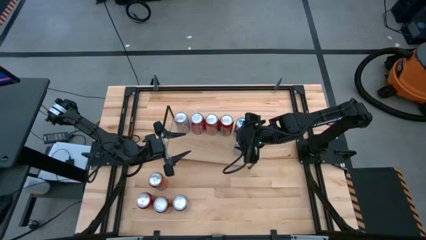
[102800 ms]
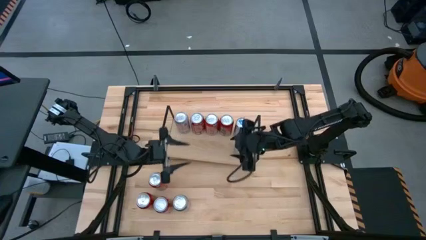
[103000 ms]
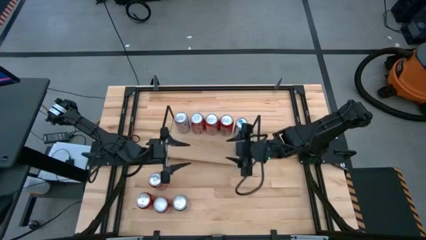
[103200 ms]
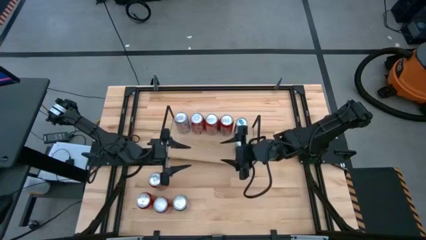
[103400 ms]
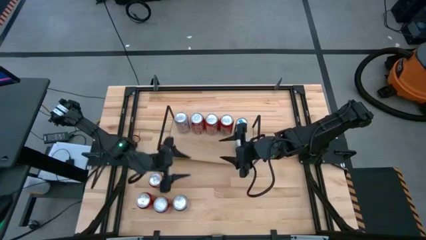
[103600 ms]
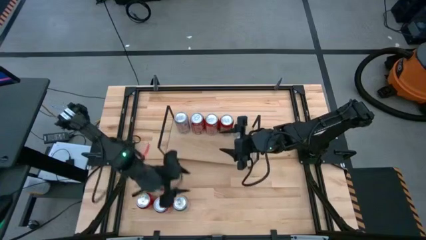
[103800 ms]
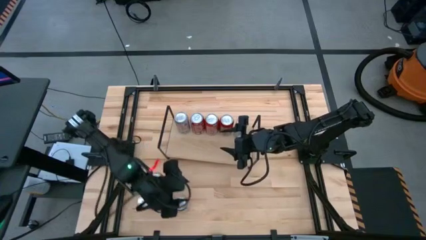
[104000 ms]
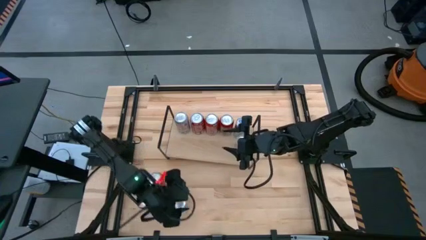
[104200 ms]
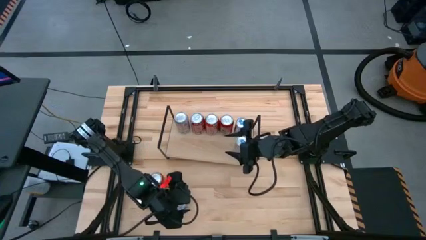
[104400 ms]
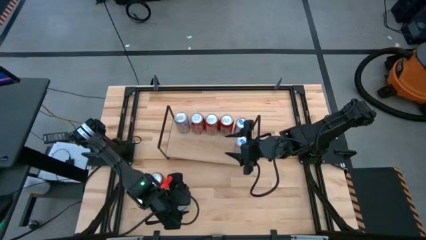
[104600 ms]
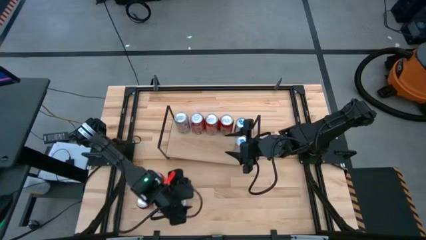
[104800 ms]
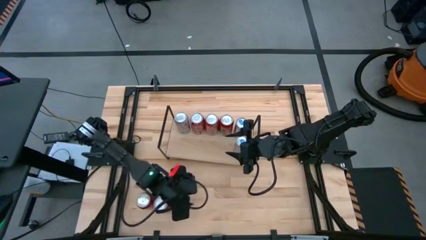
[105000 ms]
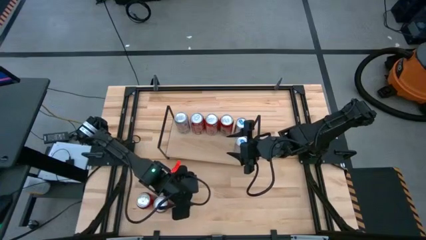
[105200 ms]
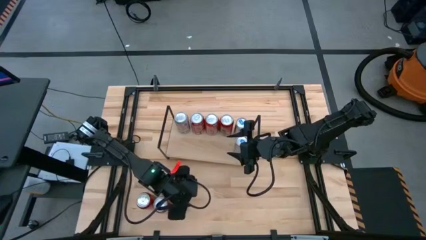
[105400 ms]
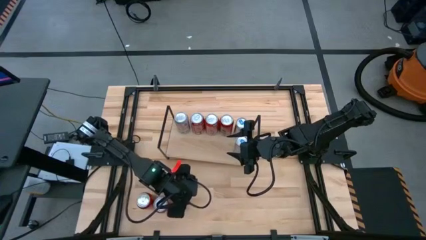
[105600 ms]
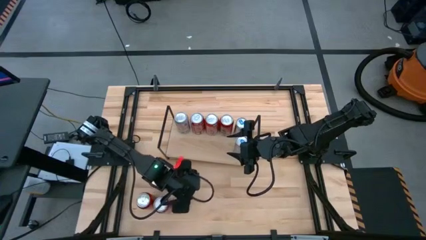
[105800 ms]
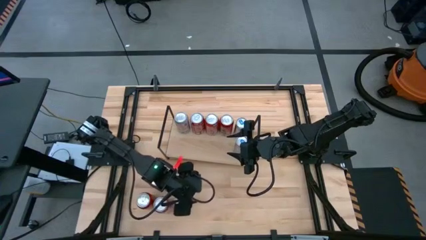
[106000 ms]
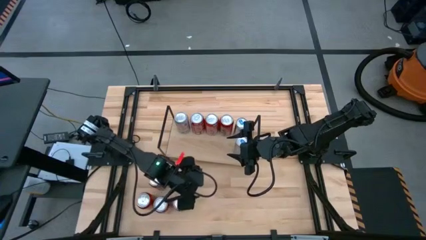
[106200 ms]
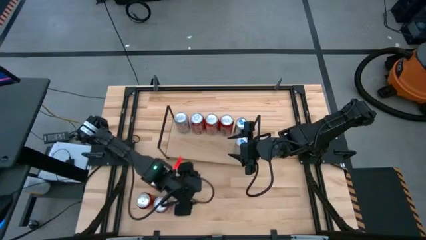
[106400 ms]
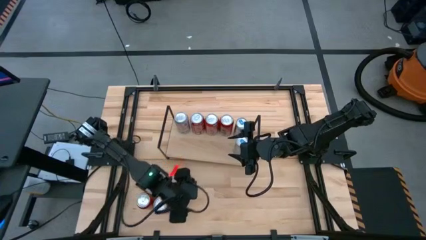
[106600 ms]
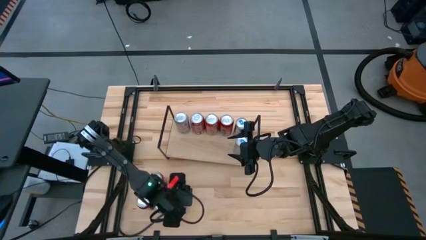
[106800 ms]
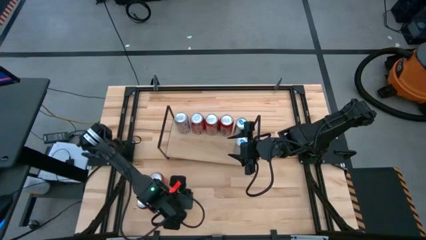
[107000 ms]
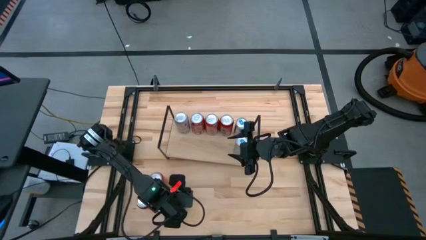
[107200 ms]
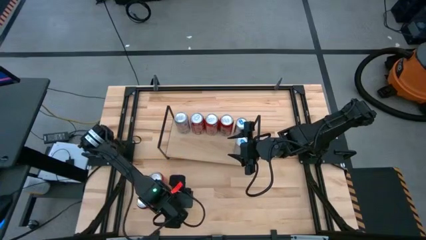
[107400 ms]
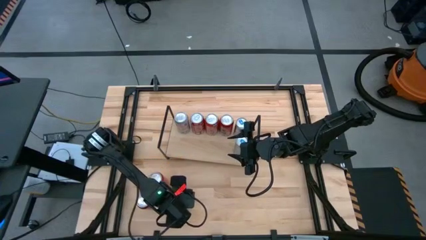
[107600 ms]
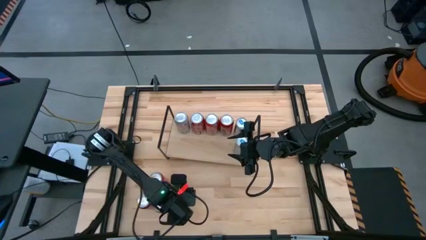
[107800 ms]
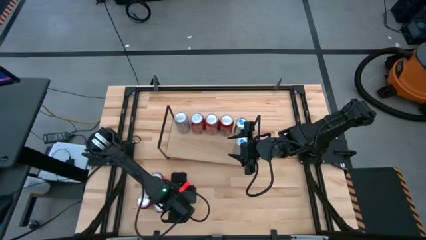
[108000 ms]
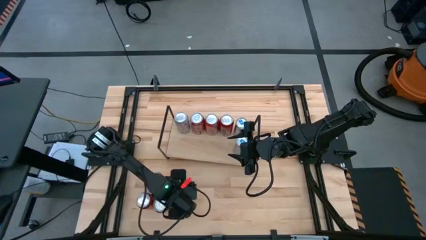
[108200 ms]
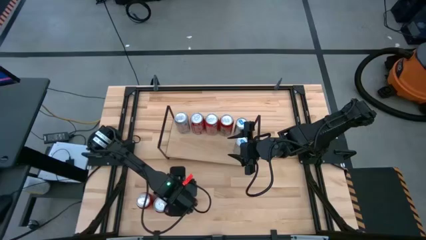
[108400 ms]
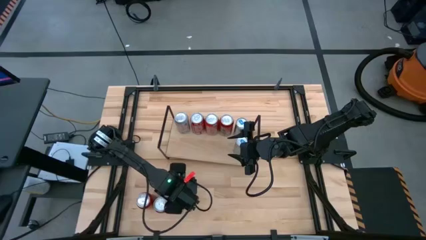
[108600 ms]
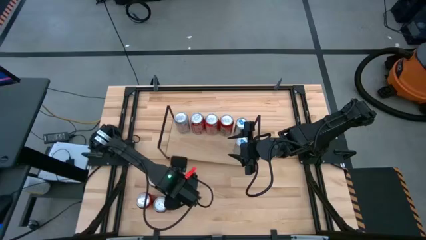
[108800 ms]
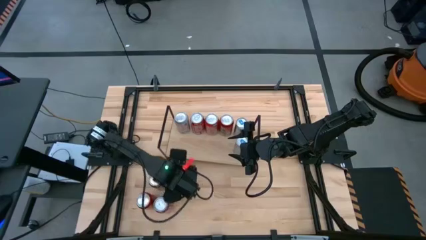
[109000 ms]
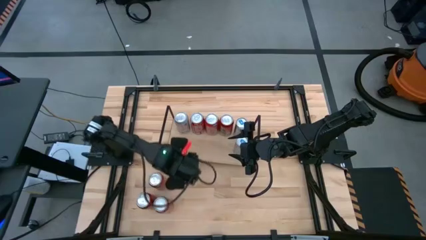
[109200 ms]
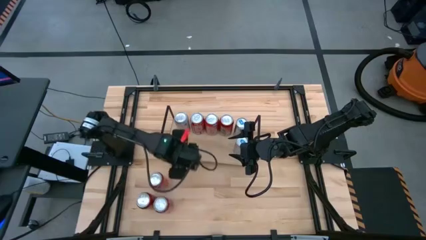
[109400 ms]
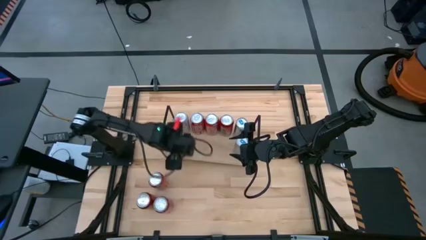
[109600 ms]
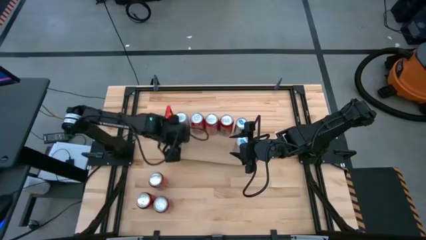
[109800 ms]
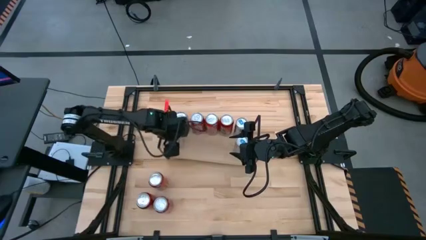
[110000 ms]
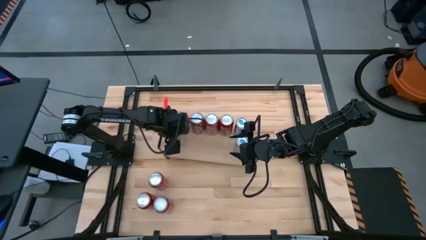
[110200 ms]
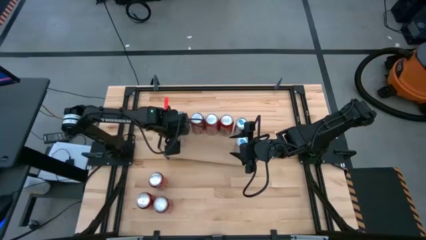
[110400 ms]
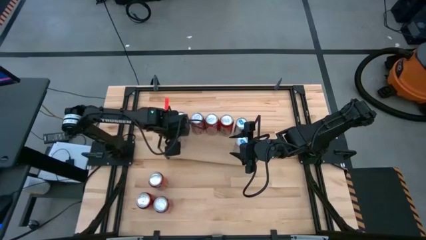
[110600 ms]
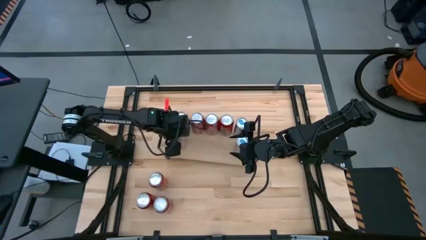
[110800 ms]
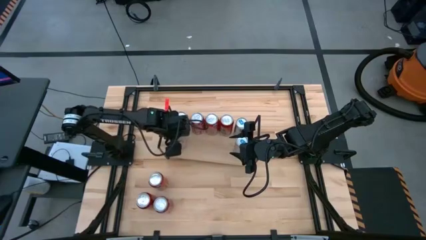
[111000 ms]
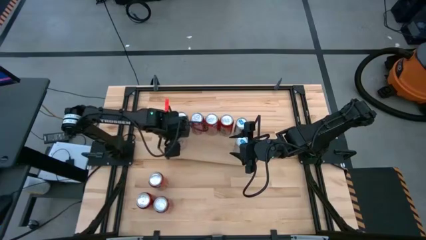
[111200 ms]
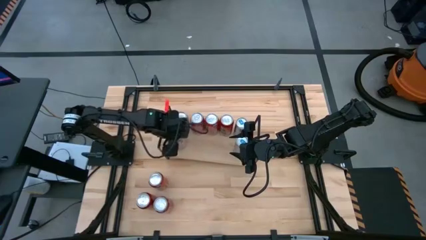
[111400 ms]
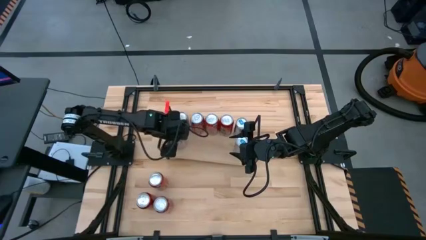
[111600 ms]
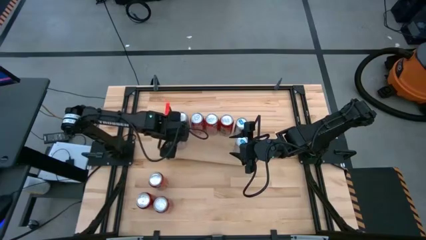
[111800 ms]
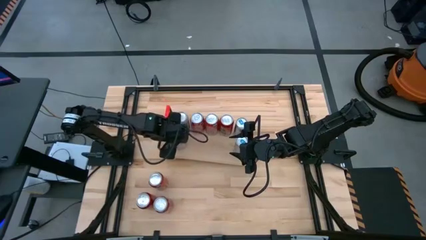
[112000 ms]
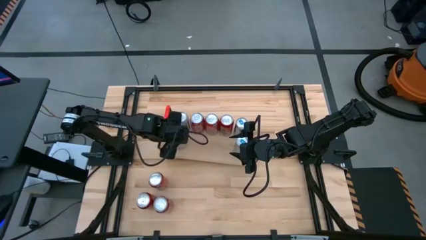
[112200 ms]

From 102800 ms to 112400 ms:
Task: Place canned beverage on shelf
Put the red-silver soda can on the shelf aligned with the other red-silver soda can

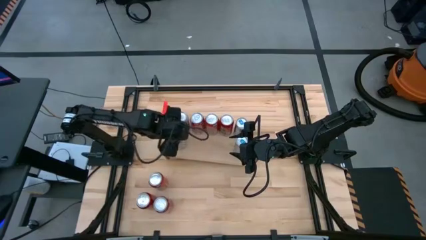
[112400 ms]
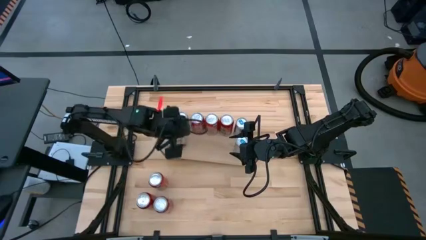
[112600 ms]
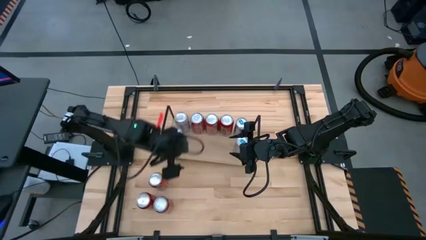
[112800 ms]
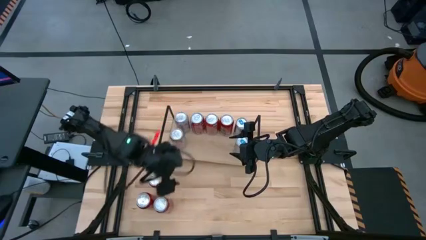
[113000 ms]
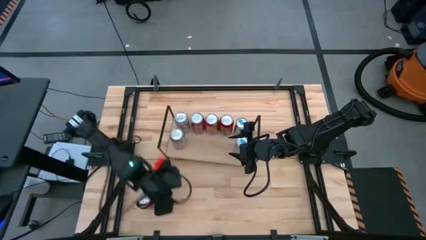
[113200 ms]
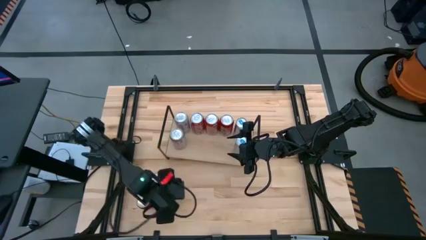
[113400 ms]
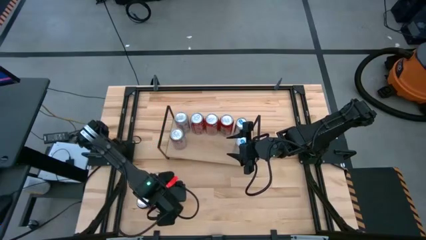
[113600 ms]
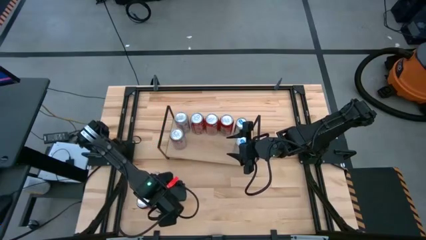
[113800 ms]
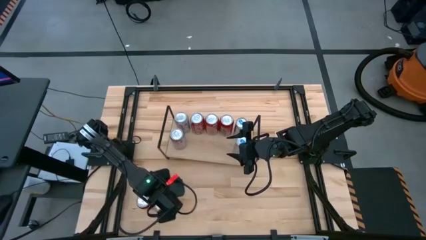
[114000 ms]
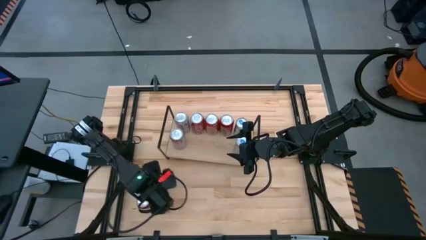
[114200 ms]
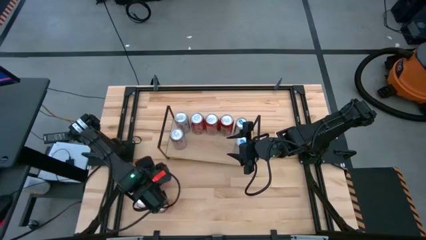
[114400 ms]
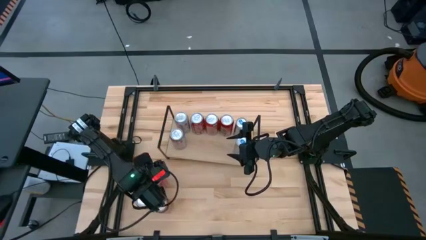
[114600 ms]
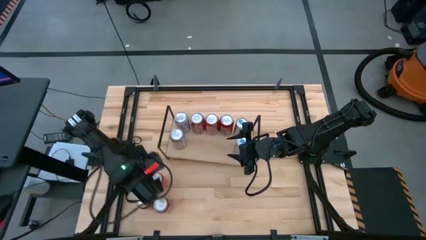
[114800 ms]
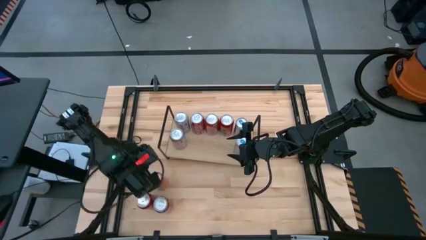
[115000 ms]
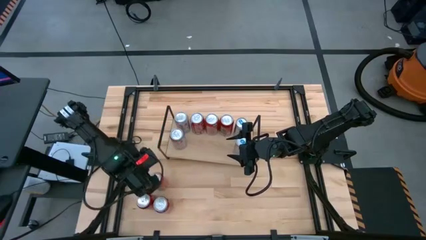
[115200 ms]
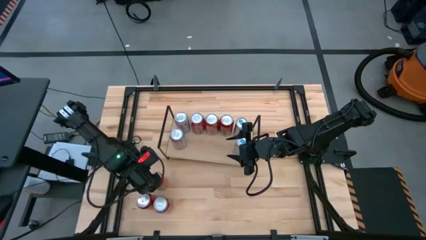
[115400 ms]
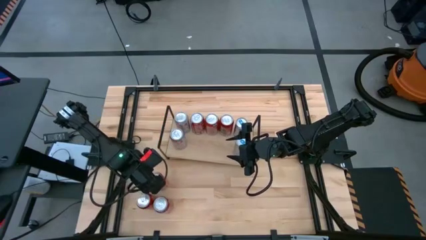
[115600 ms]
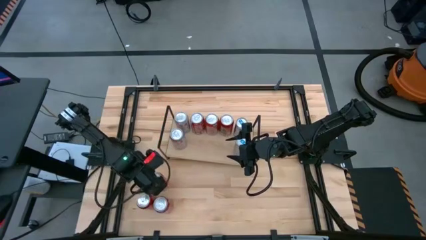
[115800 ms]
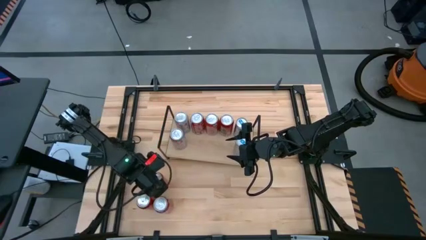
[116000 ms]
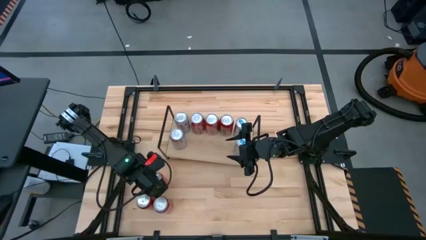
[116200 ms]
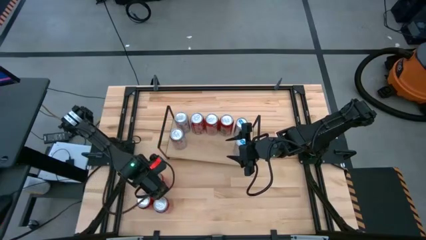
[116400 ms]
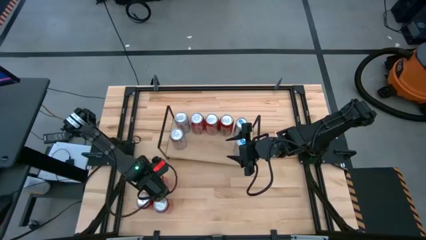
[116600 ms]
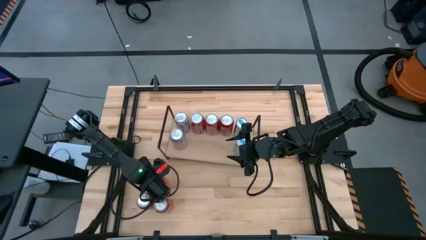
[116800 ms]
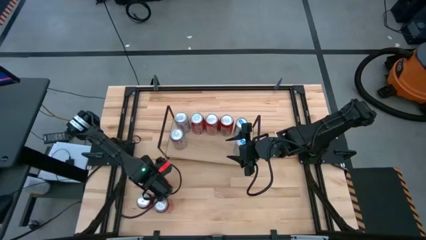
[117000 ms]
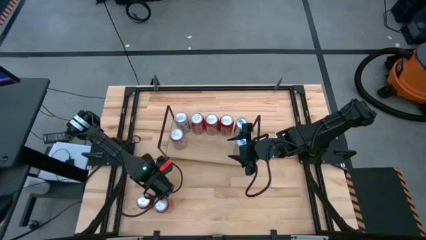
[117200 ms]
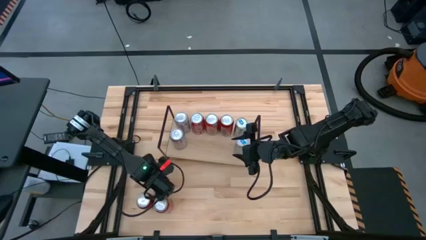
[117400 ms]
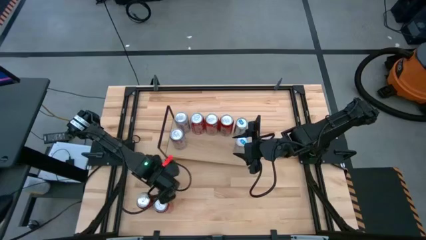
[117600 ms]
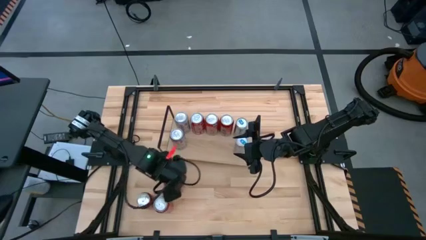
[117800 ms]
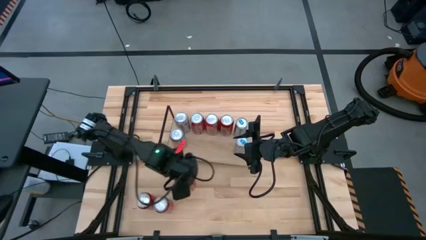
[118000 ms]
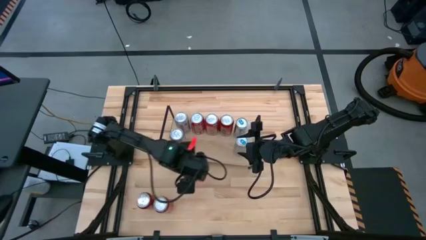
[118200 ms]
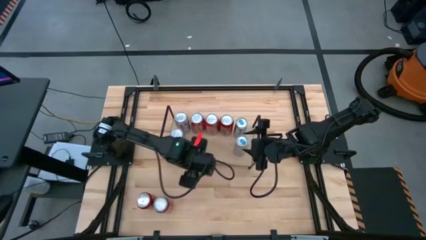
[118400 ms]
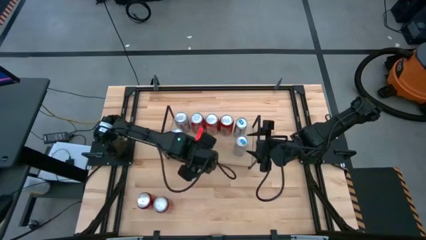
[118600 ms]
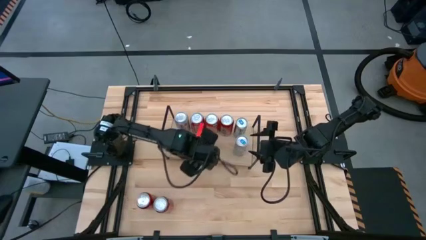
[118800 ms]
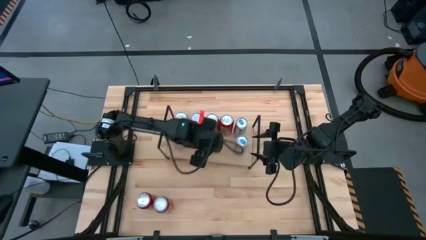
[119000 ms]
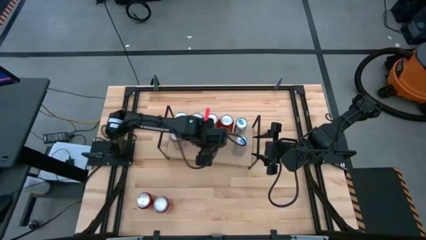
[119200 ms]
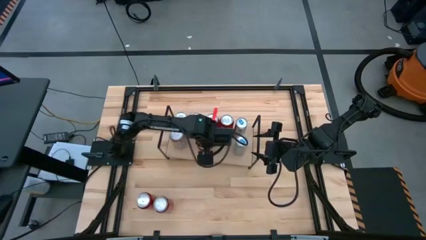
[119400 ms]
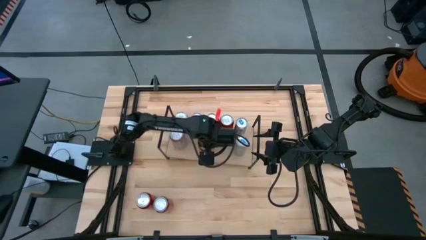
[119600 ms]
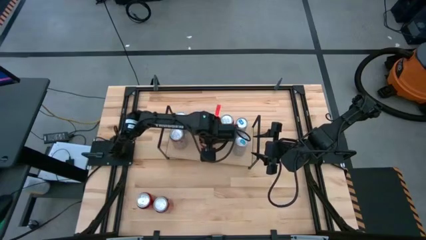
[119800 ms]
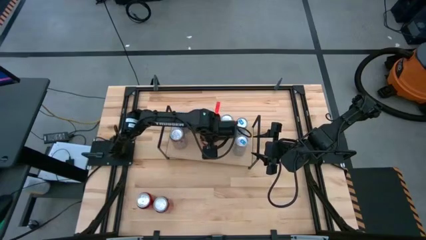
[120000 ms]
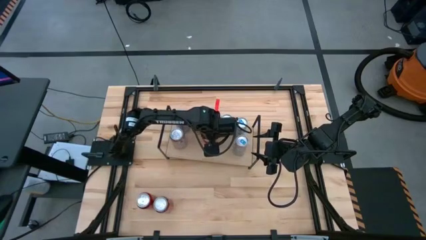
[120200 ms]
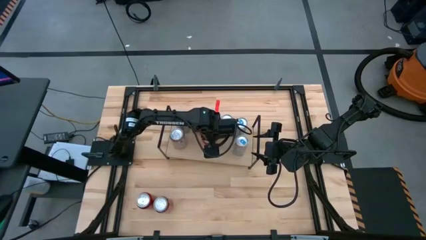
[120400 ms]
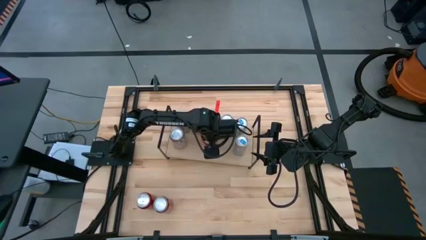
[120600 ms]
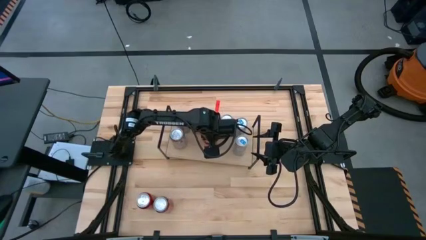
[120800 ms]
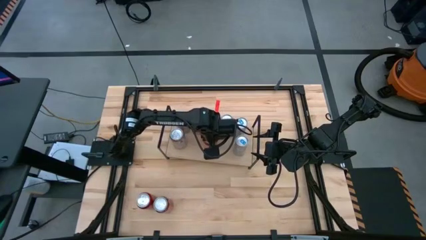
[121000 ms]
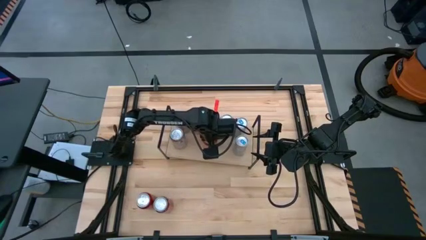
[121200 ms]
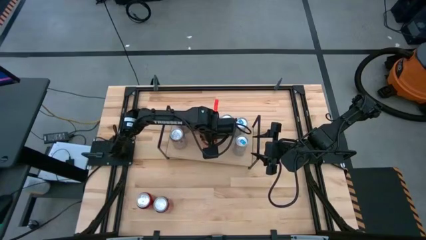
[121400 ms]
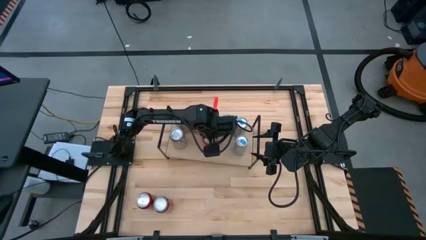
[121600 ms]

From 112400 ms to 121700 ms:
Put the red soda can on the shelf aligned with the other red soda can
